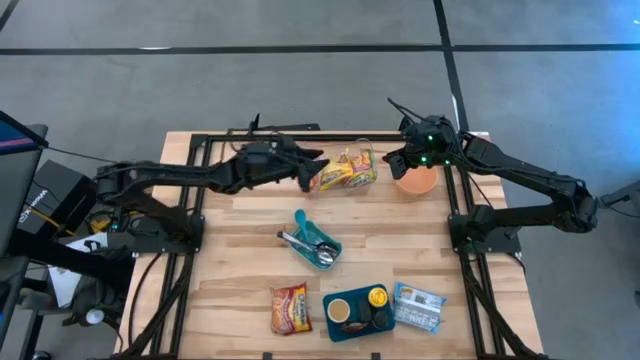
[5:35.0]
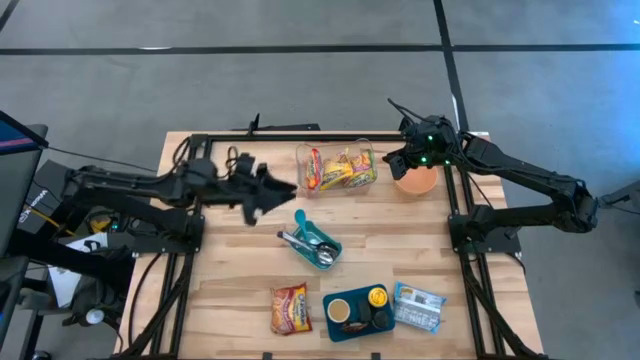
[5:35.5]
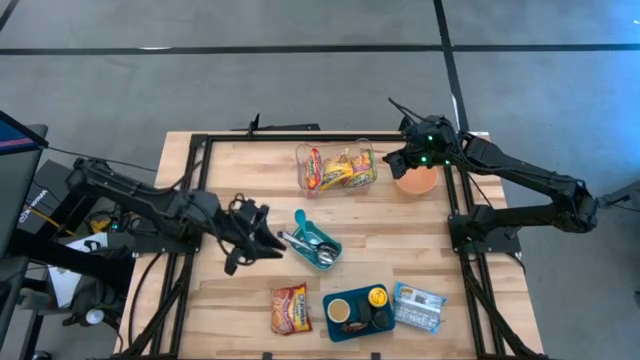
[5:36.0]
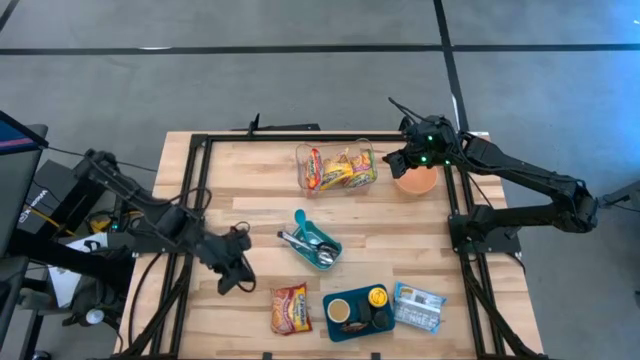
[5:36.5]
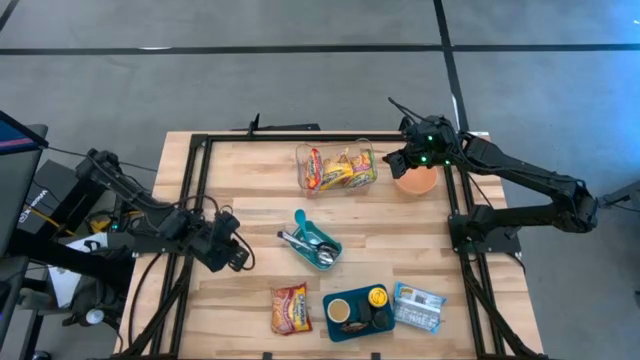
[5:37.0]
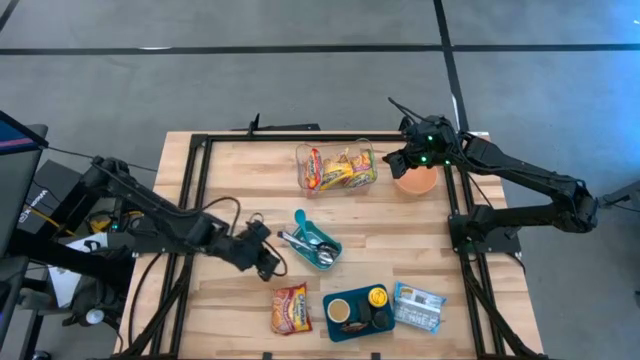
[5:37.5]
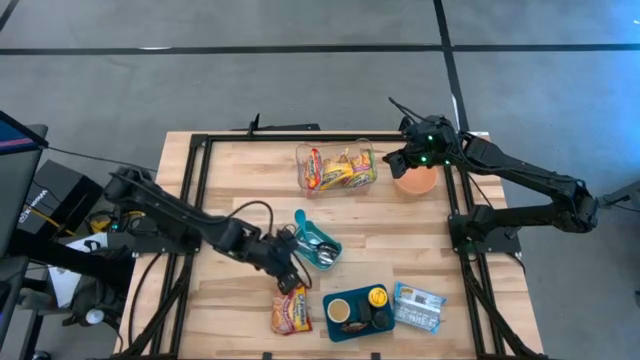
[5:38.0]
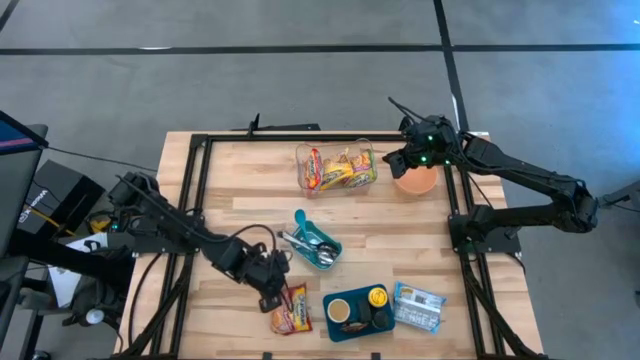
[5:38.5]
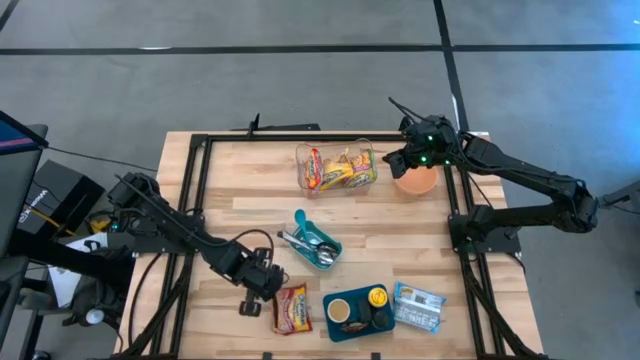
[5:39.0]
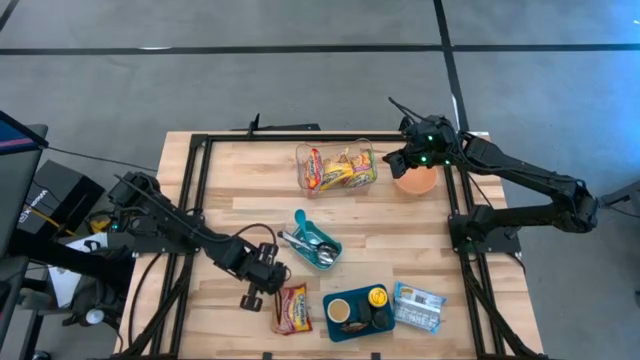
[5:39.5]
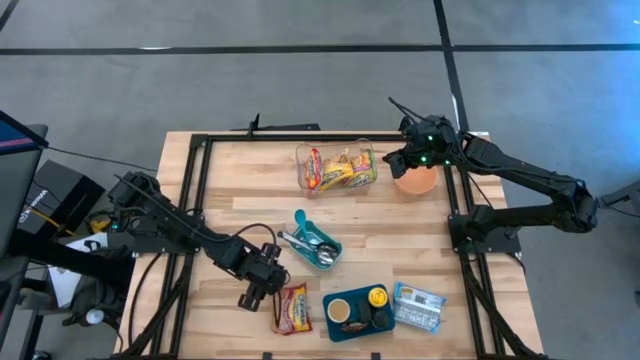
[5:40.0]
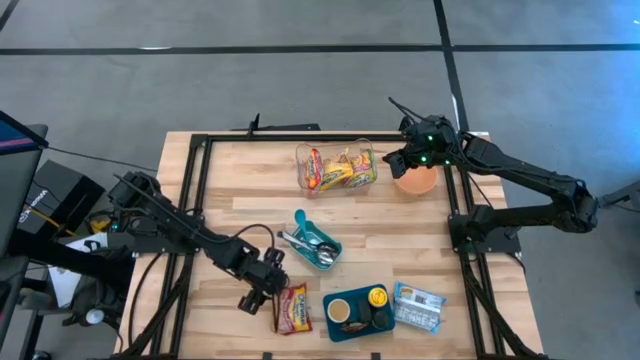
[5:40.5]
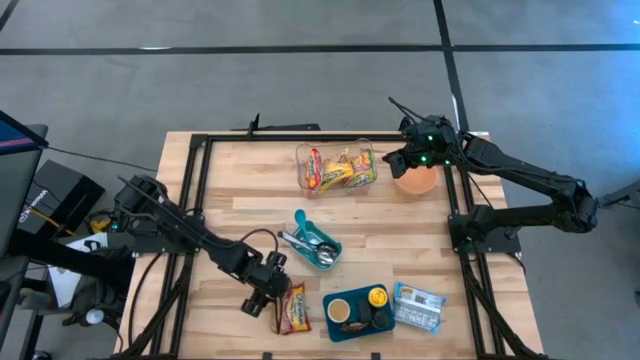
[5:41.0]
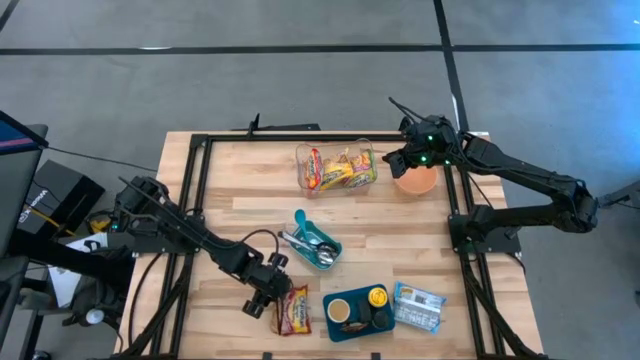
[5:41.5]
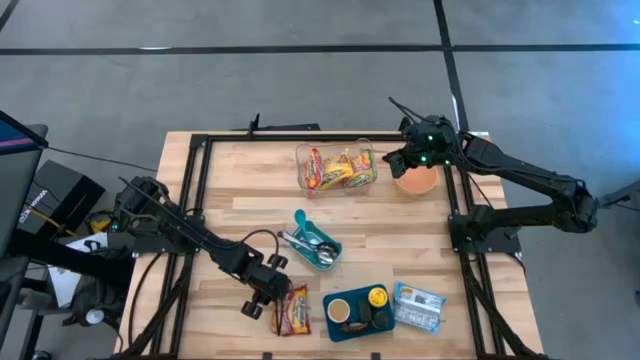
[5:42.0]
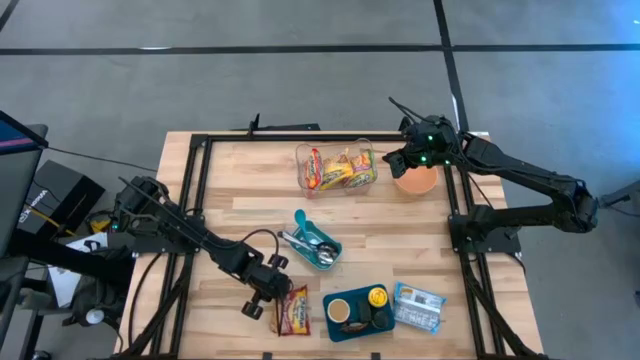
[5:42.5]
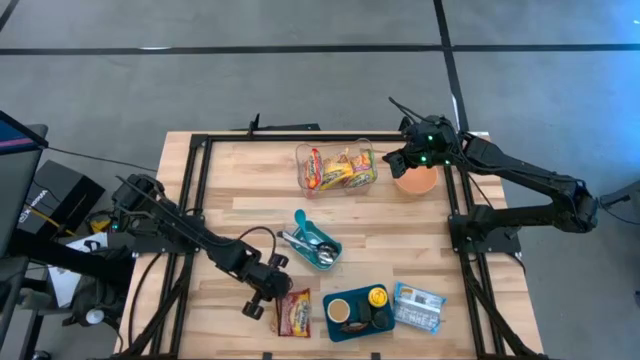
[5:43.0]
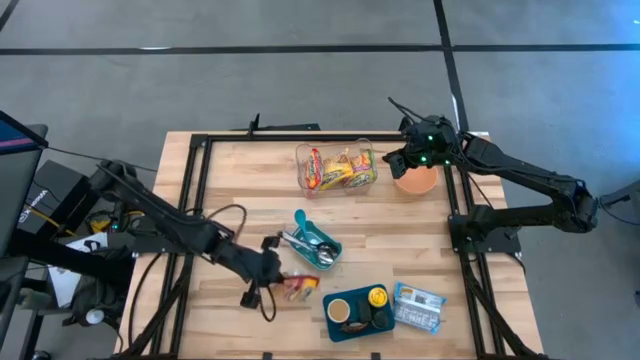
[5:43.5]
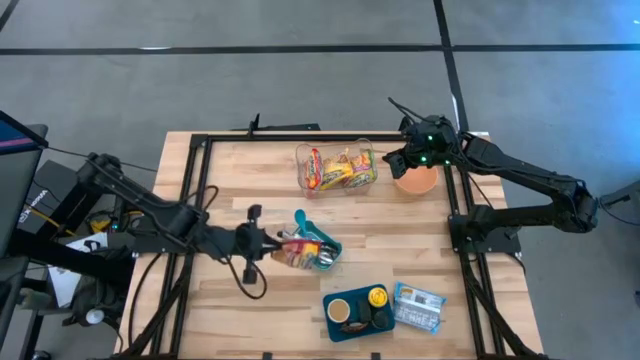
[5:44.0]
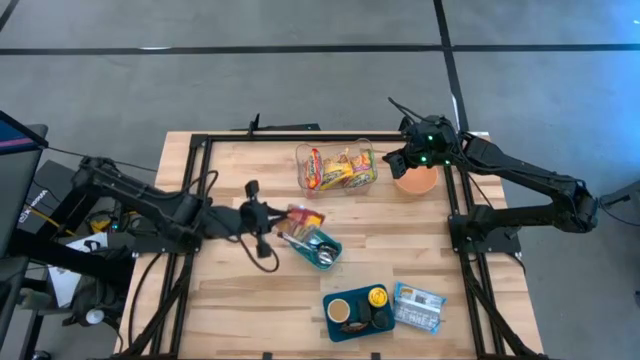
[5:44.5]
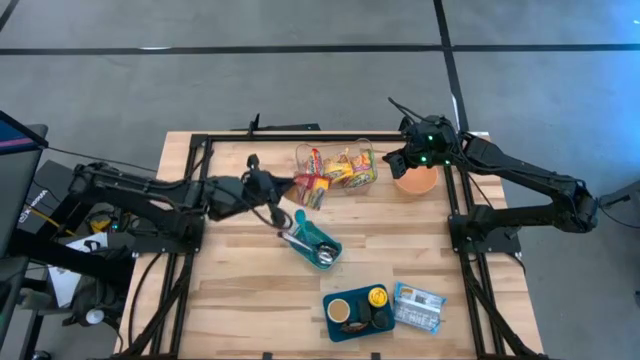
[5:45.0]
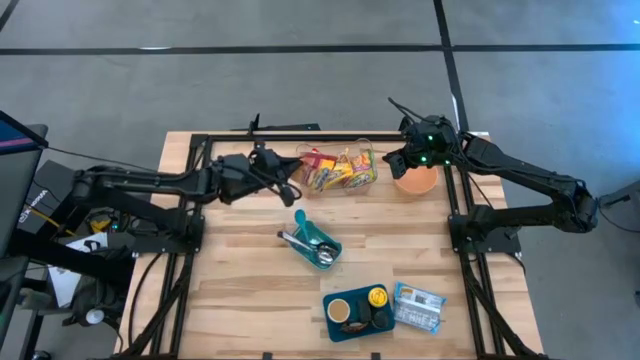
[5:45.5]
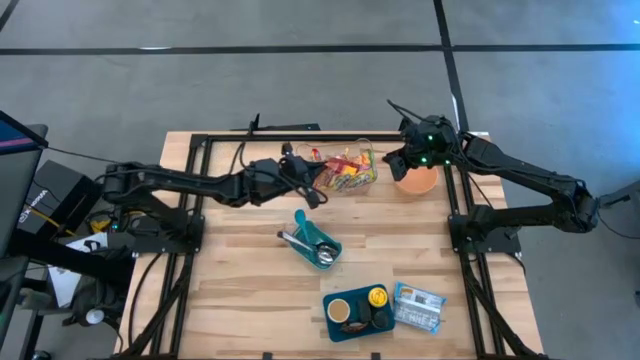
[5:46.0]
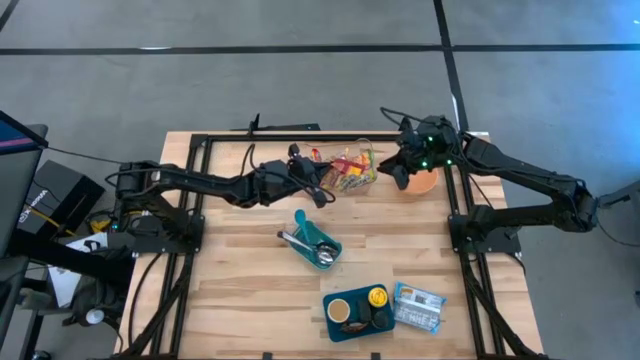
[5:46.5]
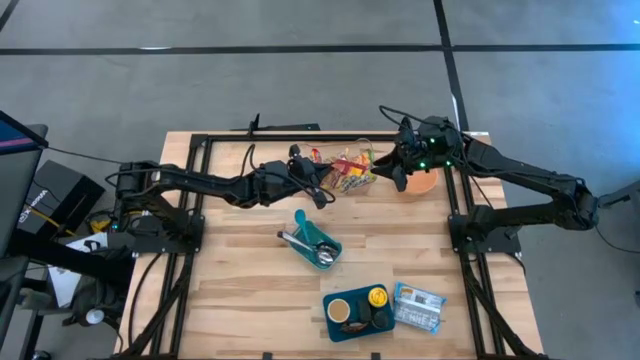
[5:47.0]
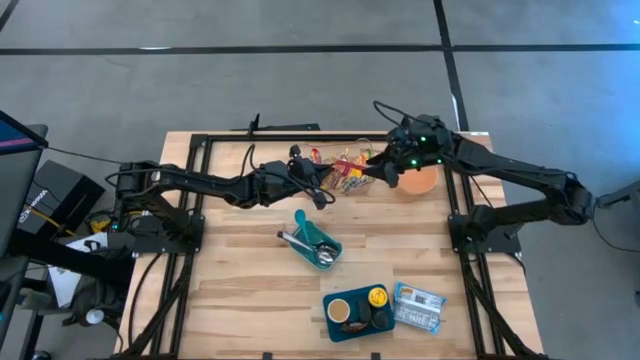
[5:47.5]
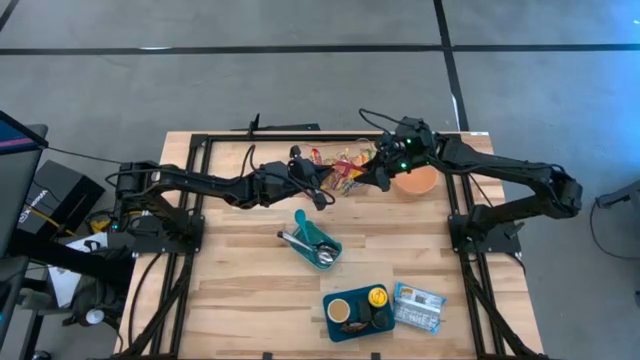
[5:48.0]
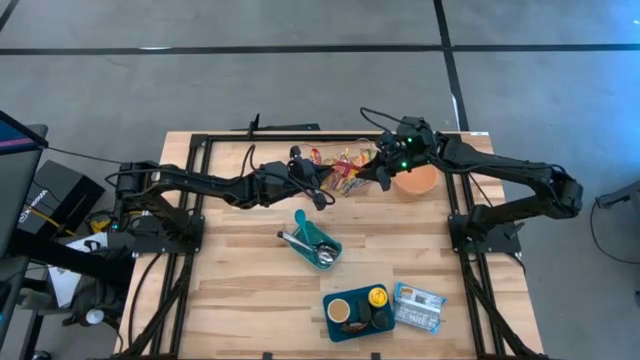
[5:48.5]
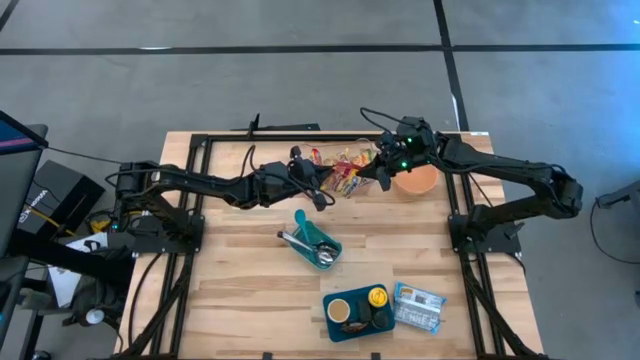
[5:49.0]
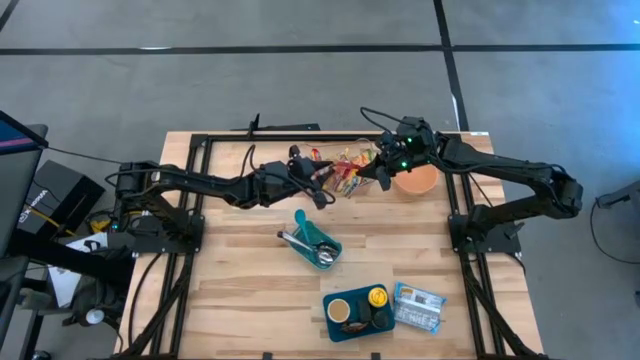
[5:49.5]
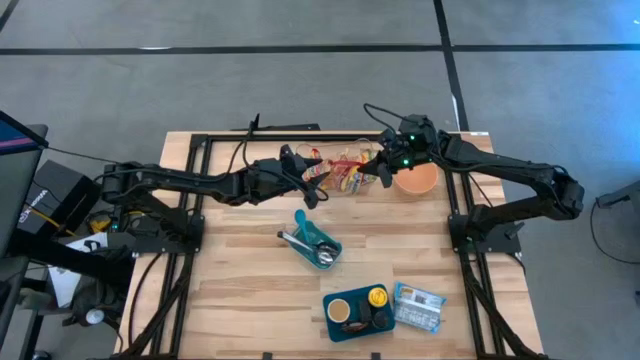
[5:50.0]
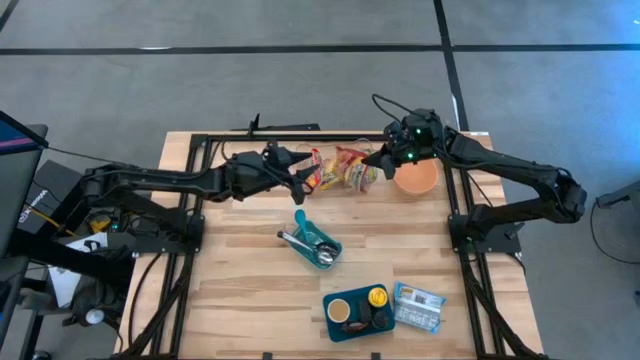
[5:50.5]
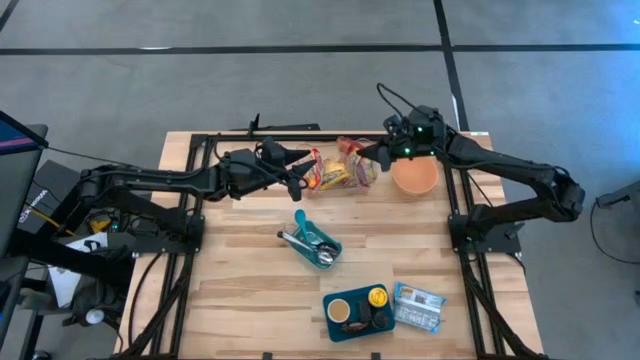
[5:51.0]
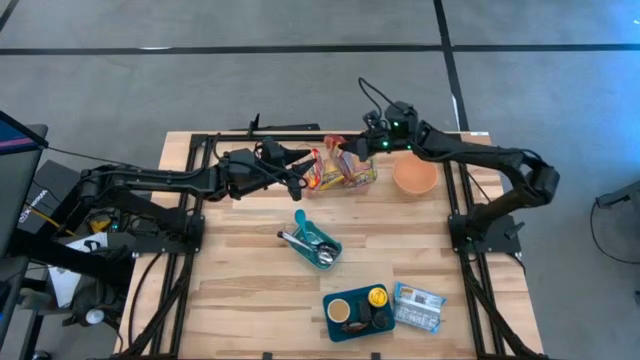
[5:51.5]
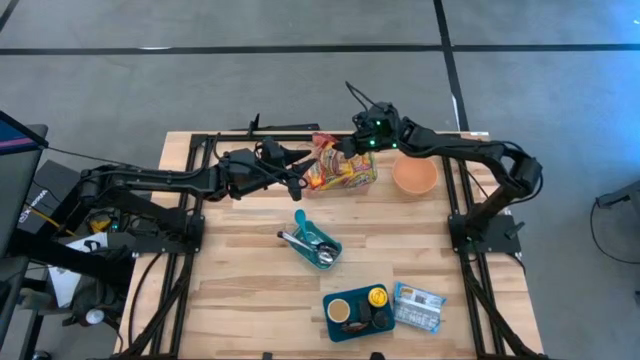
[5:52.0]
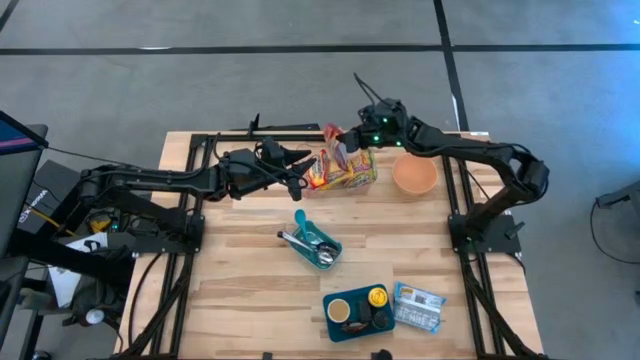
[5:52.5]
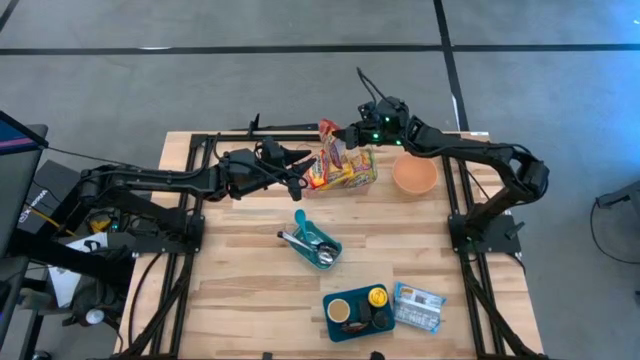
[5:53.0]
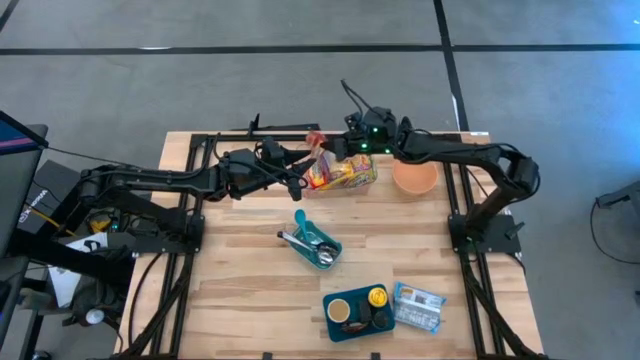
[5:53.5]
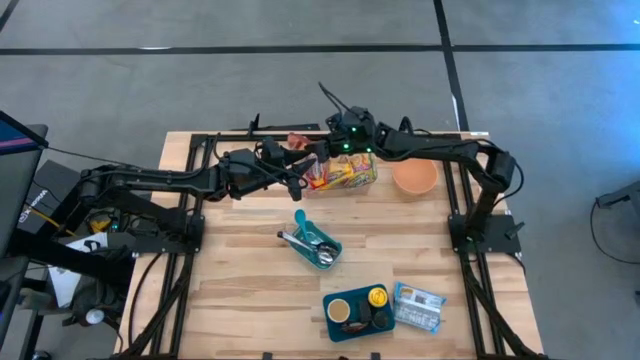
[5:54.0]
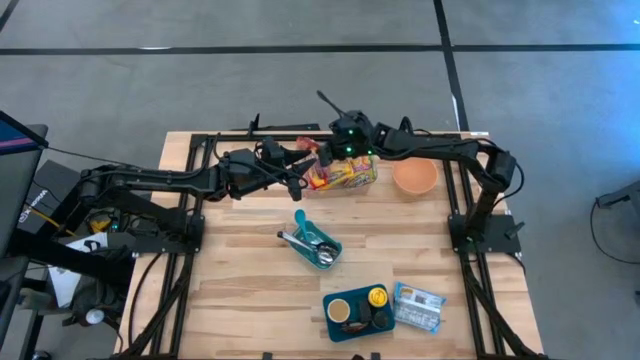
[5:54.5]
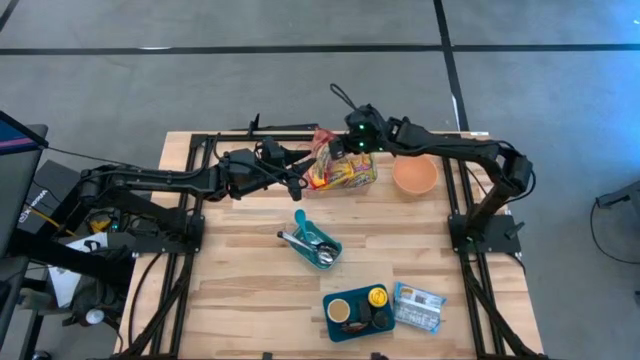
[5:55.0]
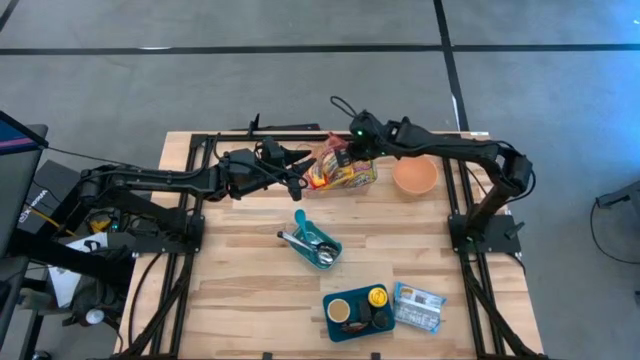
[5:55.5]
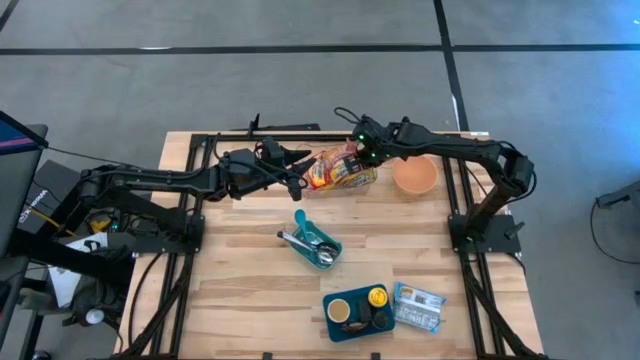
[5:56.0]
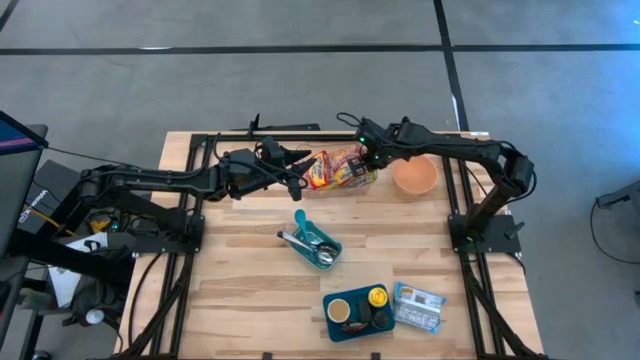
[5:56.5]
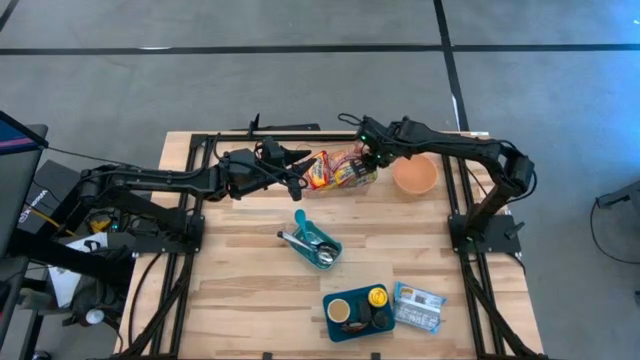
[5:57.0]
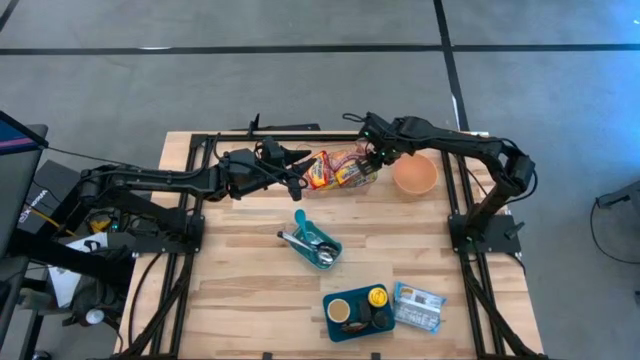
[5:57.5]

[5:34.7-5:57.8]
Task: Pick & Place Food Item
Put the red noodle pack into the transparent bin
